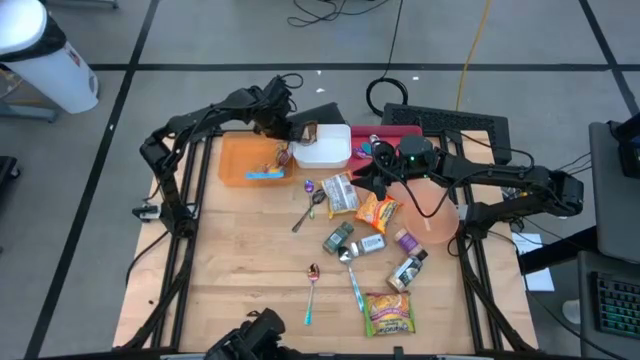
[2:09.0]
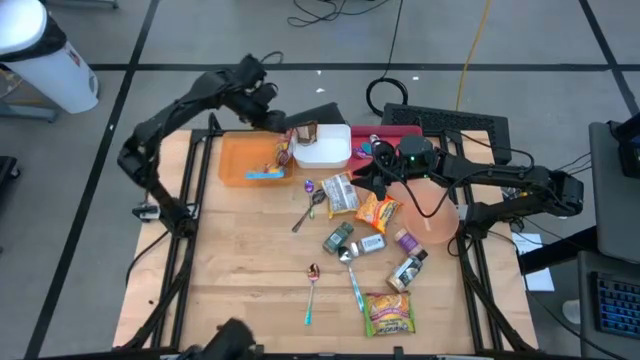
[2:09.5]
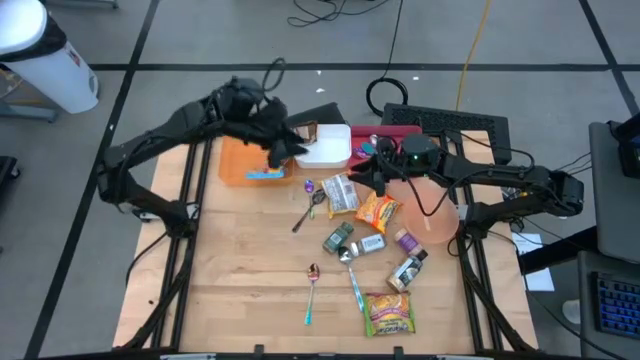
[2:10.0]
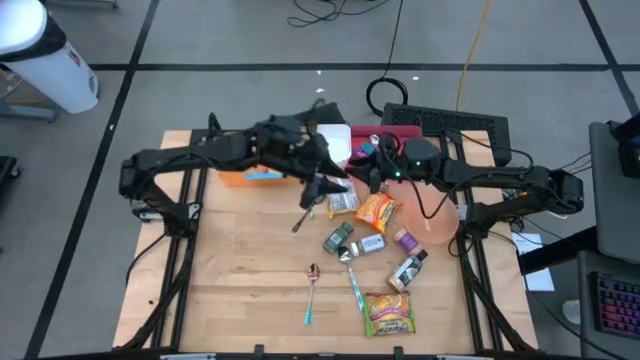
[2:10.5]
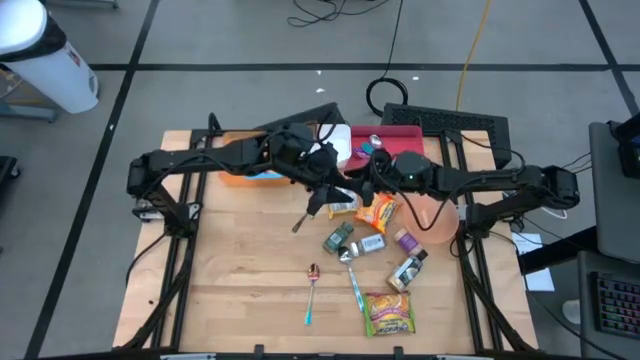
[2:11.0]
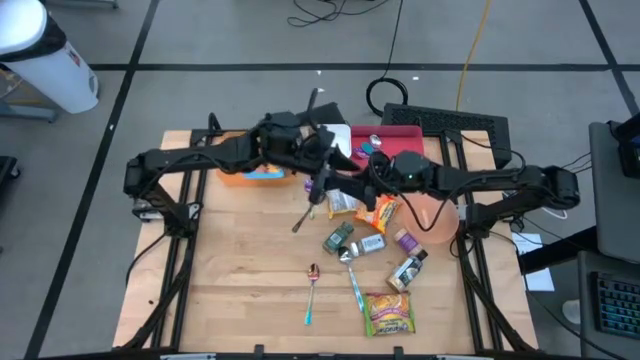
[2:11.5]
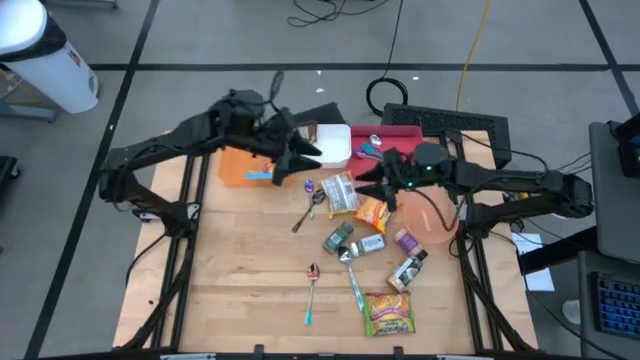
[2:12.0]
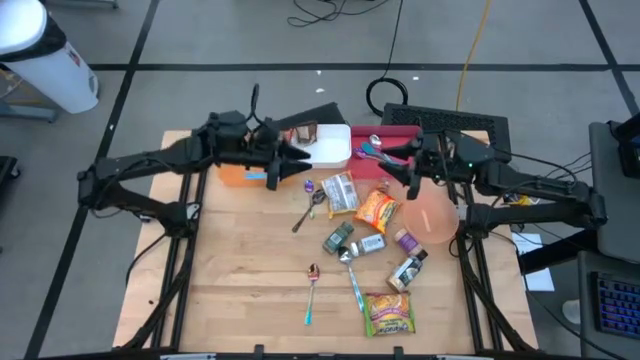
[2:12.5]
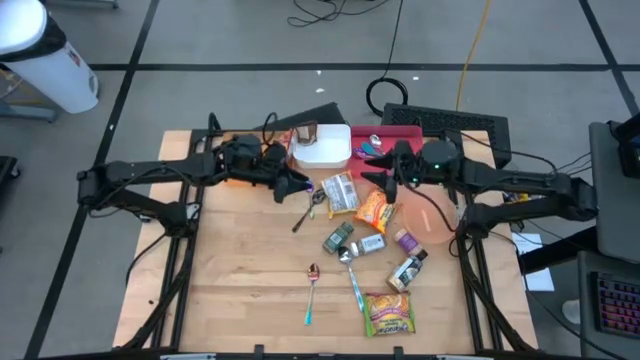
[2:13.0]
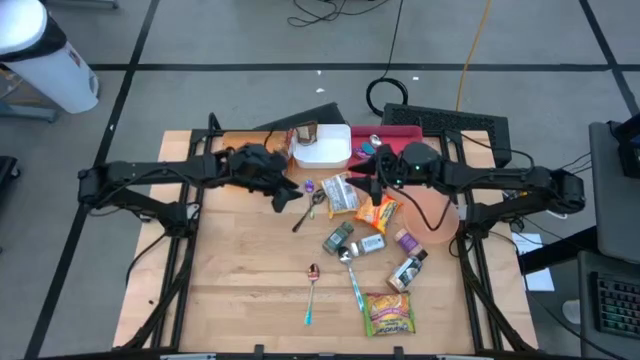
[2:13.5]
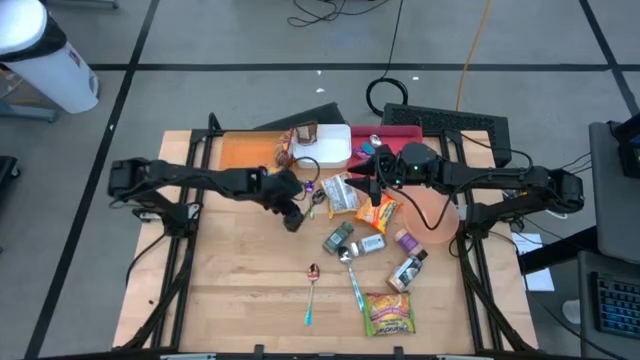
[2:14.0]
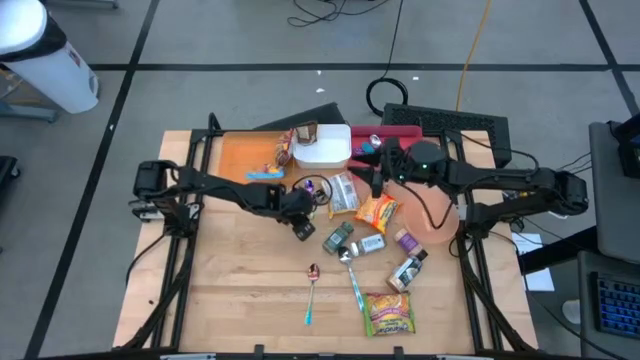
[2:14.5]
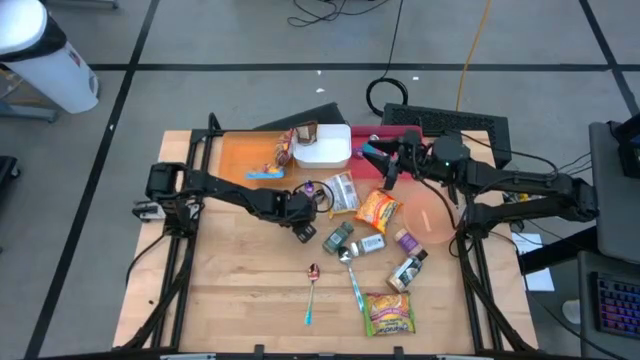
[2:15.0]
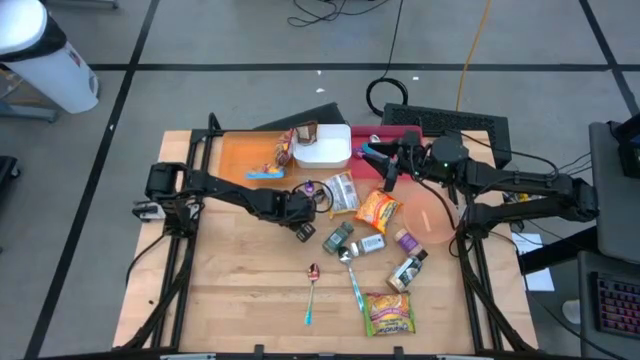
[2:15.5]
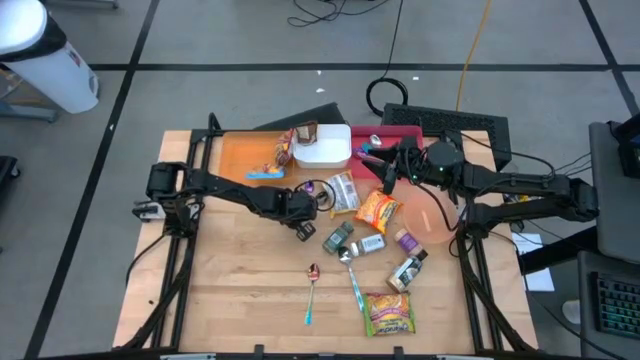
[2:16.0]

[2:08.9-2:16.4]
Task: Pick & Place Food Item
Put the black spoon into the red bin
